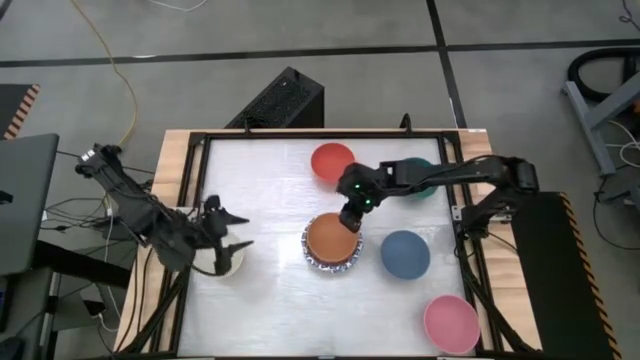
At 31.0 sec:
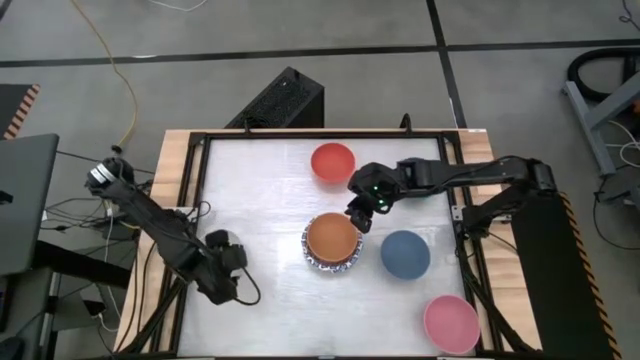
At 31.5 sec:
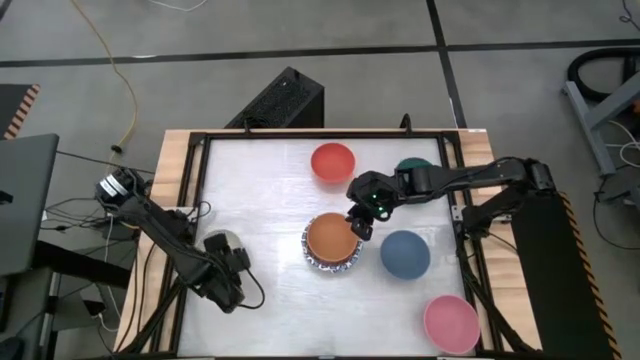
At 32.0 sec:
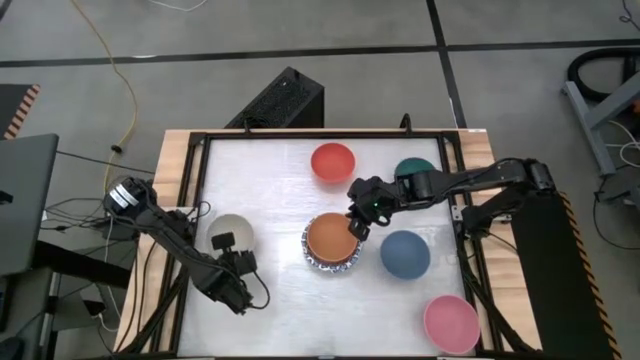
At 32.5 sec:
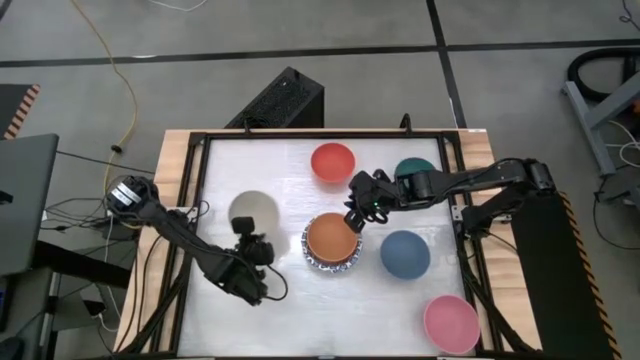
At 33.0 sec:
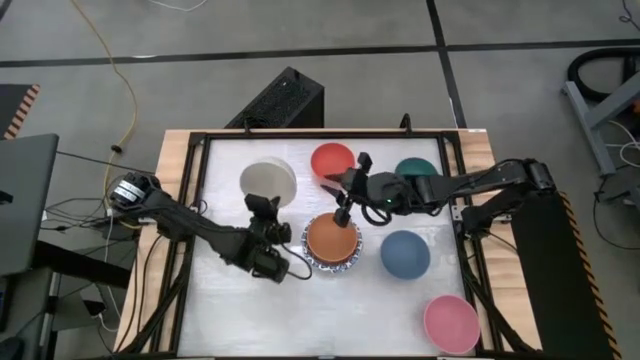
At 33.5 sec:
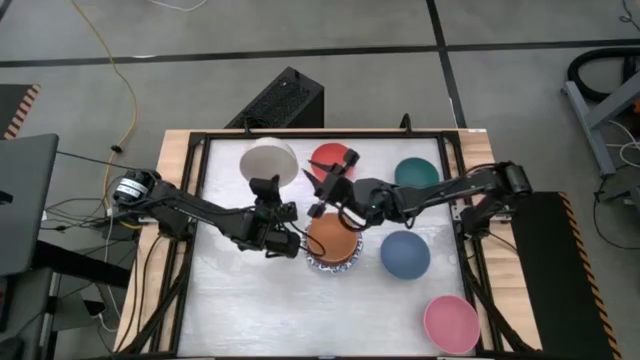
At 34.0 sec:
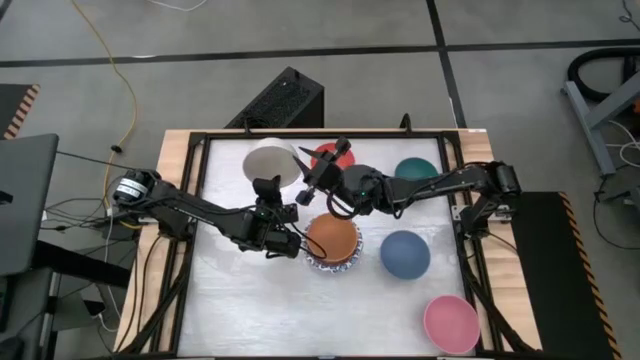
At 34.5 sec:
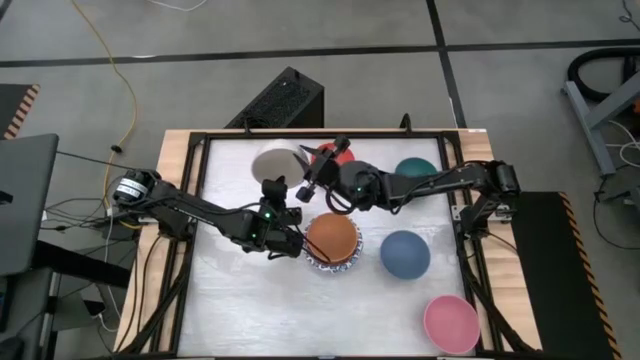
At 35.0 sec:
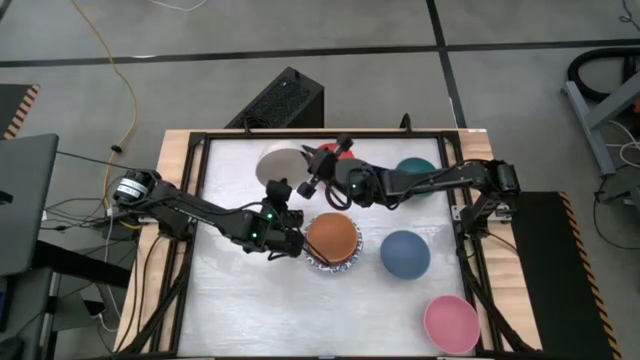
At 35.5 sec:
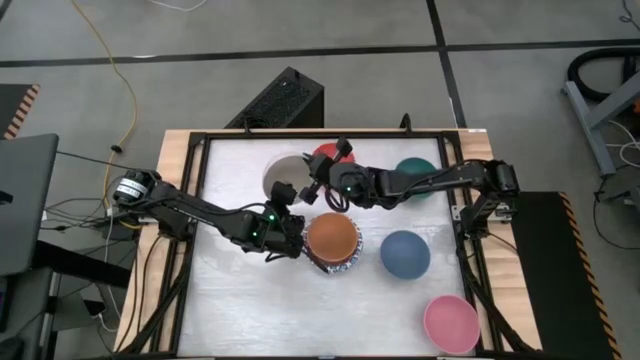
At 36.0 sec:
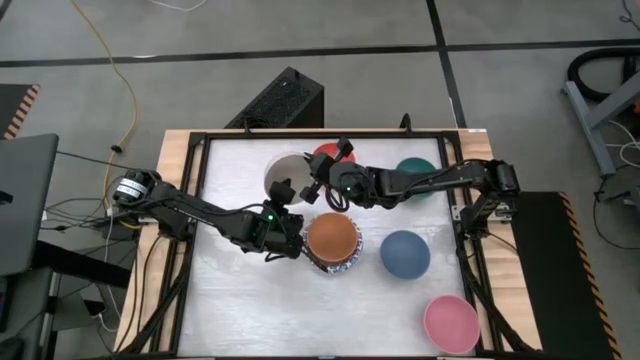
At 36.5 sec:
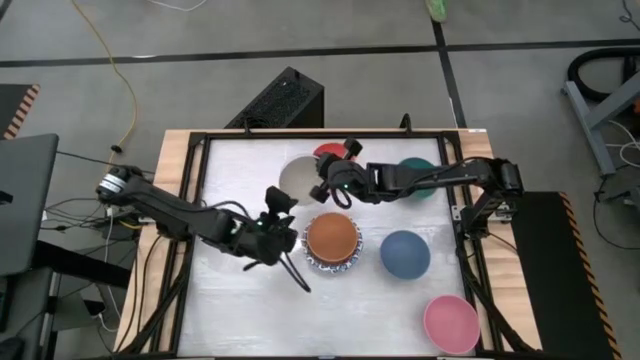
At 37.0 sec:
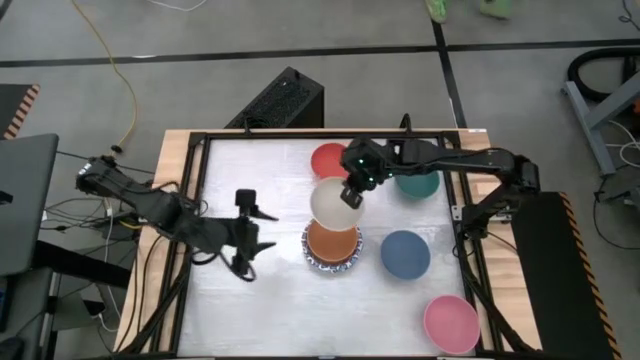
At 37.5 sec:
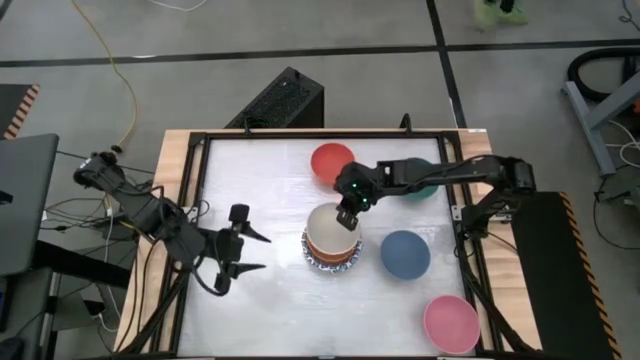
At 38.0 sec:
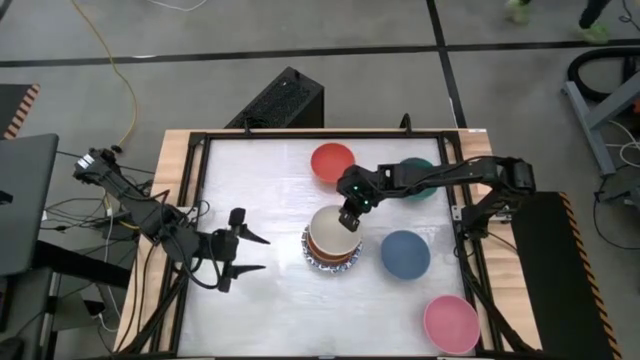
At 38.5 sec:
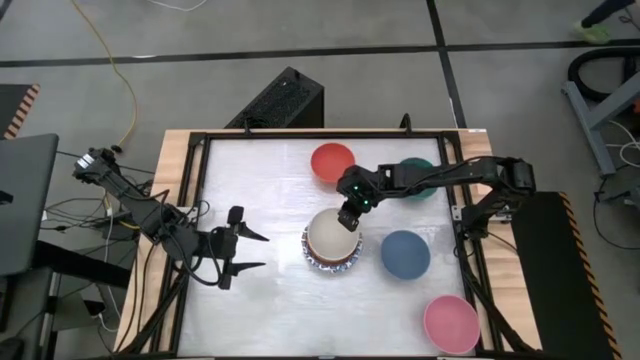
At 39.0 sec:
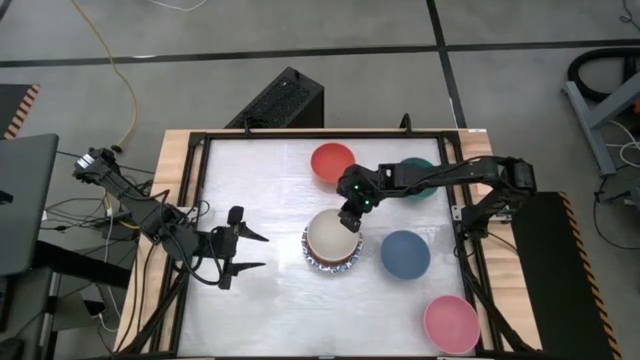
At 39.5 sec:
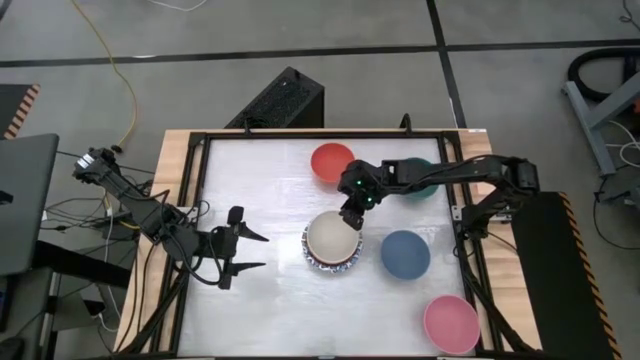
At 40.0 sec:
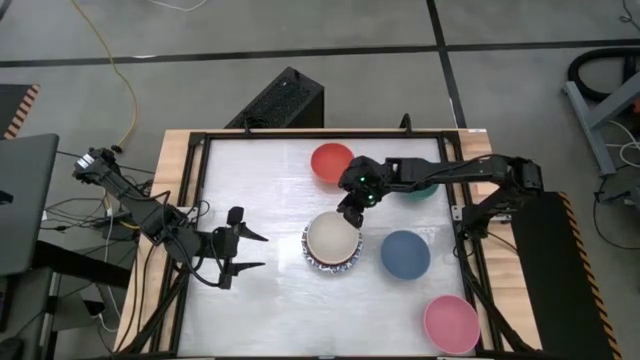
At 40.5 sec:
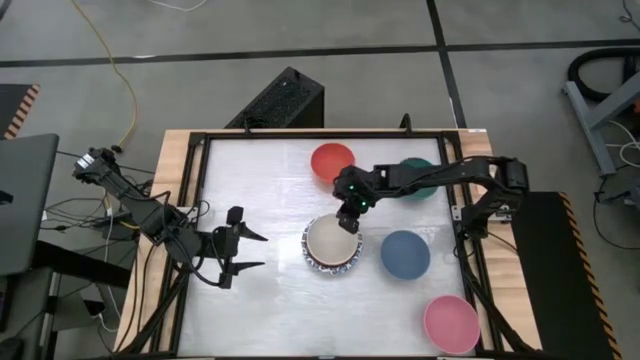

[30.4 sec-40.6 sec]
Stack the gray bowl into the brown bowl

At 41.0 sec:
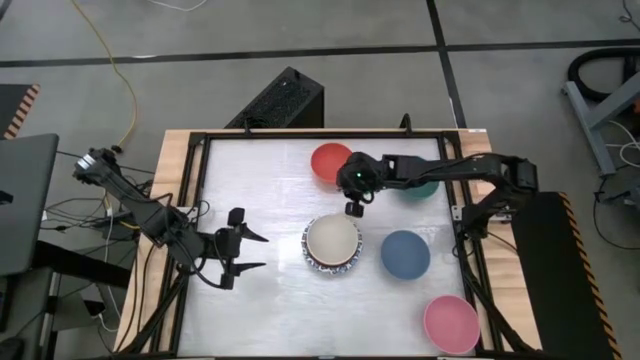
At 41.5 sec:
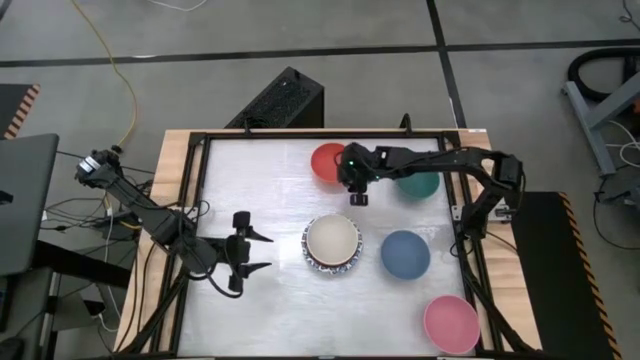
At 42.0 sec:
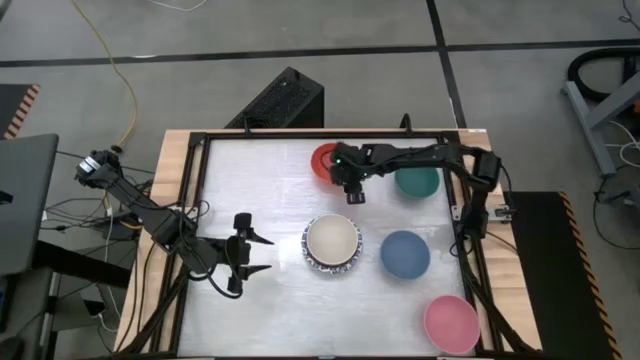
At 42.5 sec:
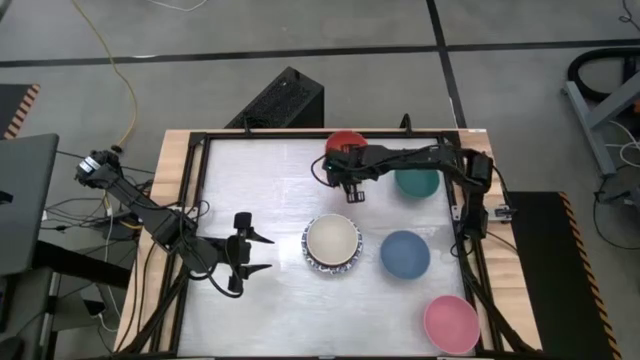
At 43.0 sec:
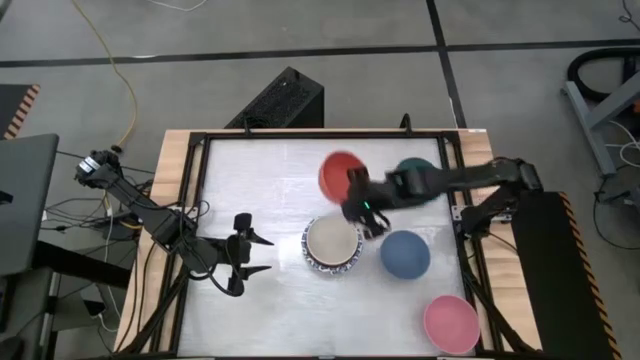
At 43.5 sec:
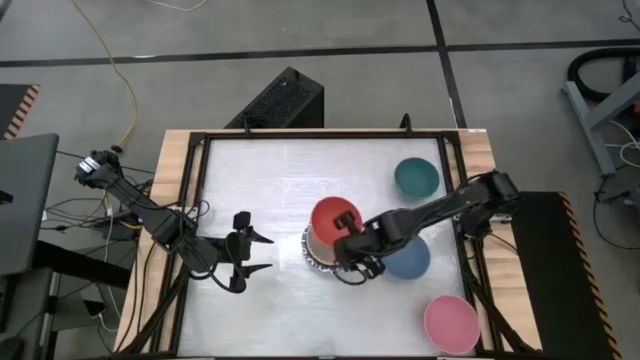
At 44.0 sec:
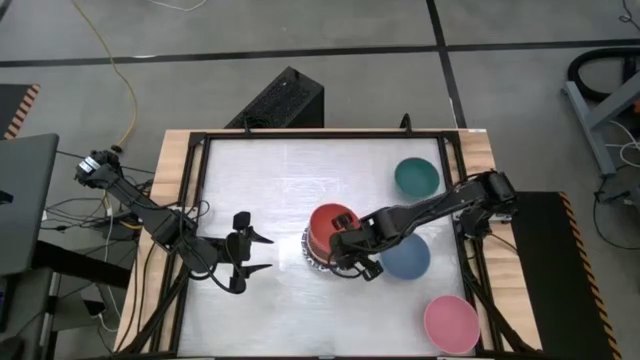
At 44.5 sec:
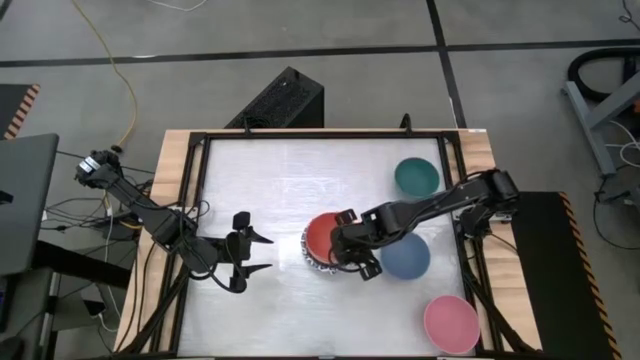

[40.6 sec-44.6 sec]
Stack the orange bowl into the gray bowl

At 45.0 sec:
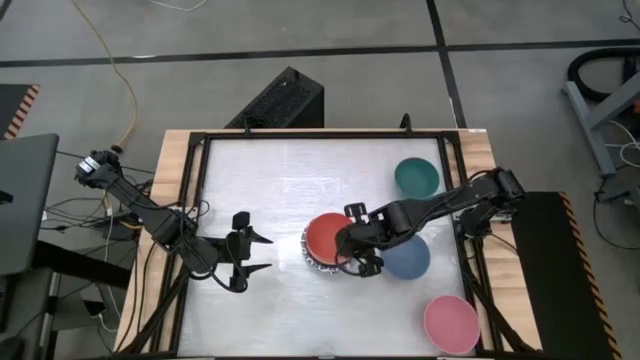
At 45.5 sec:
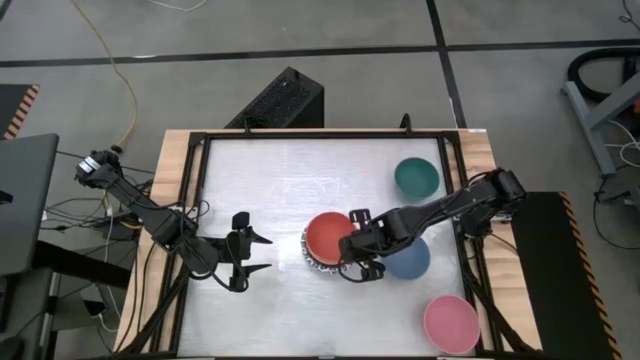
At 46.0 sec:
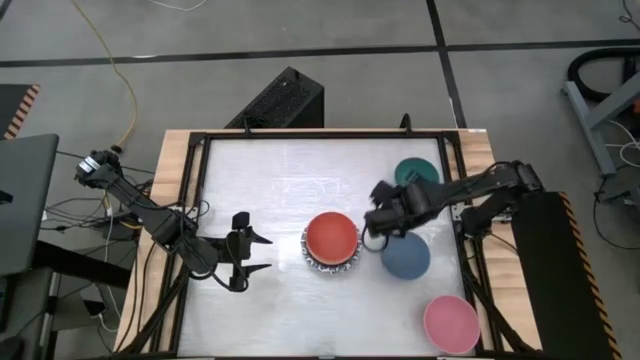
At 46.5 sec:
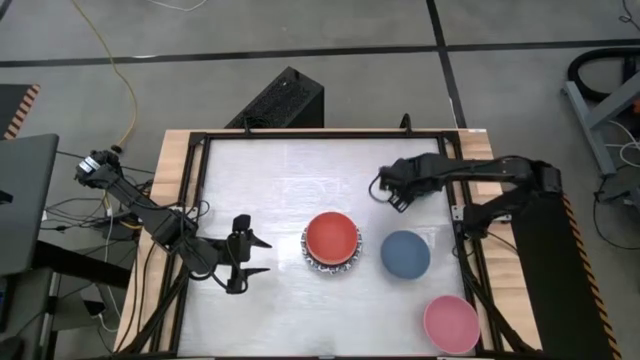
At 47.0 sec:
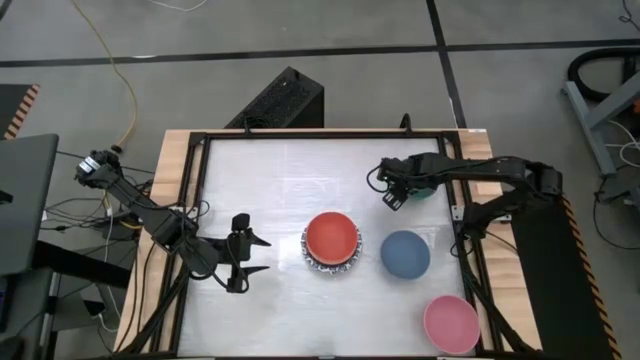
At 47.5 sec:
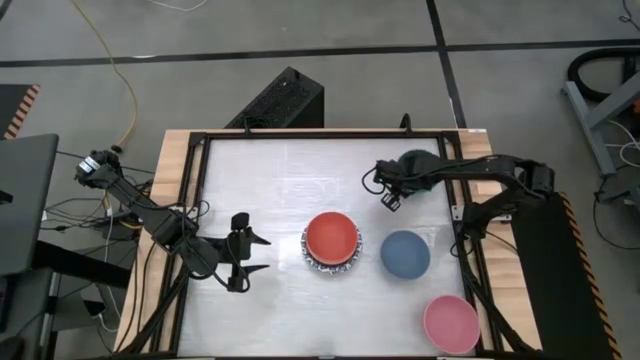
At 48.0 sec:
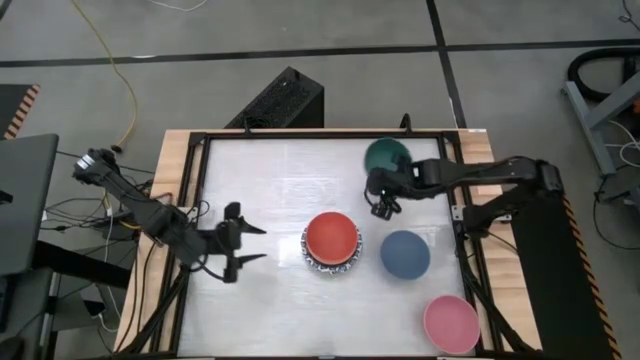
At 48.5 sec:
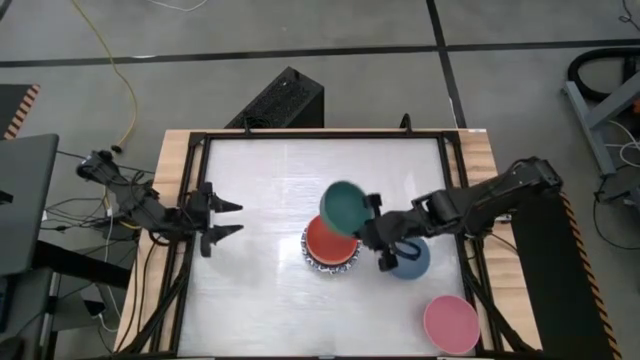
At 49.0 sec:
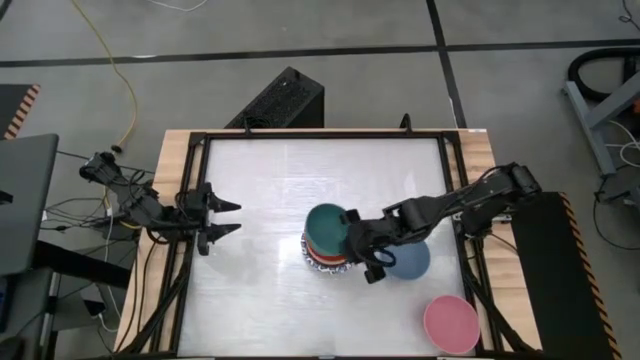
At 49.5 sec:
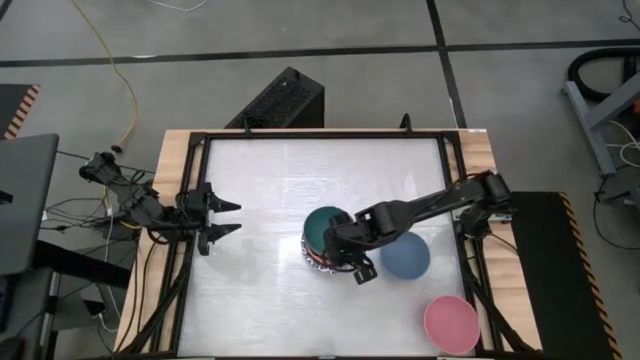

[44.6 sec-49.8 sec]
Stack the green bowl onto the orange bowl

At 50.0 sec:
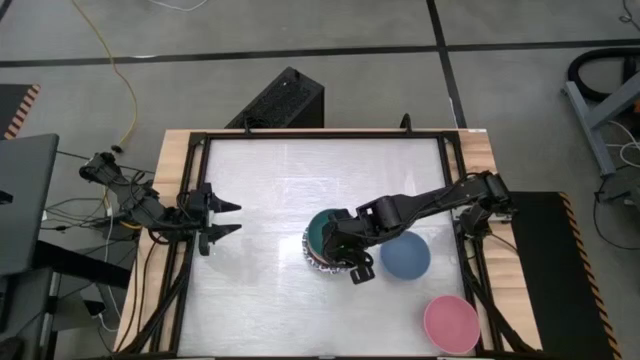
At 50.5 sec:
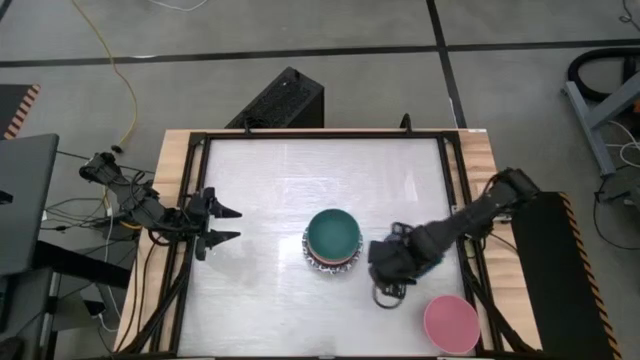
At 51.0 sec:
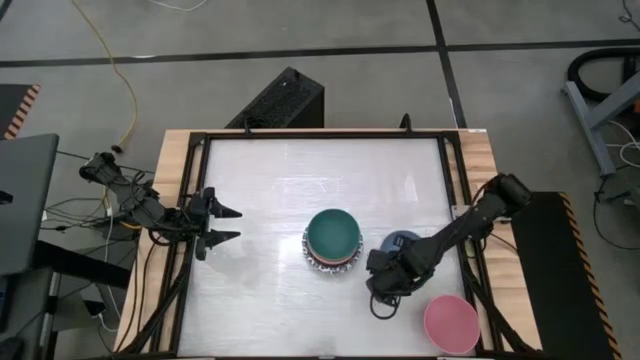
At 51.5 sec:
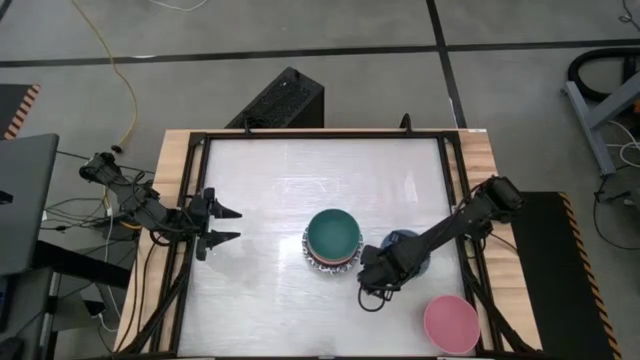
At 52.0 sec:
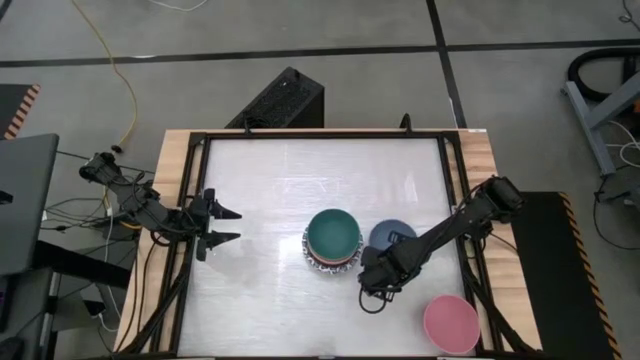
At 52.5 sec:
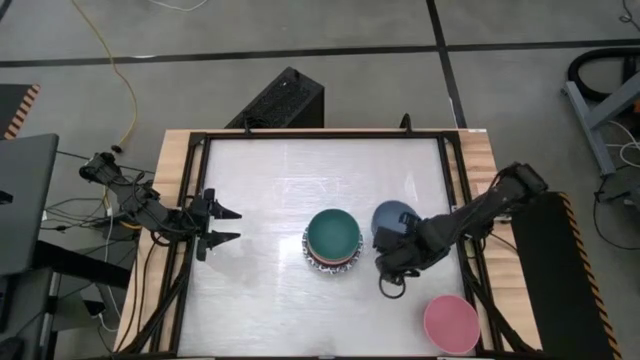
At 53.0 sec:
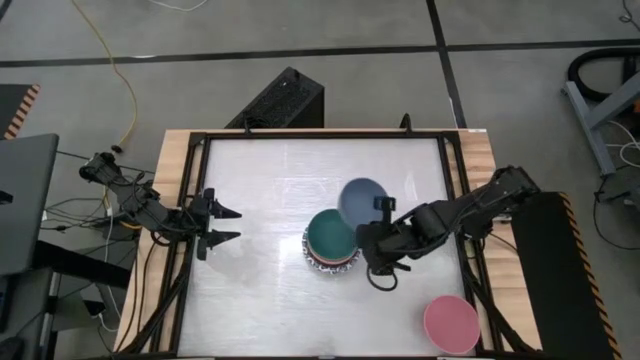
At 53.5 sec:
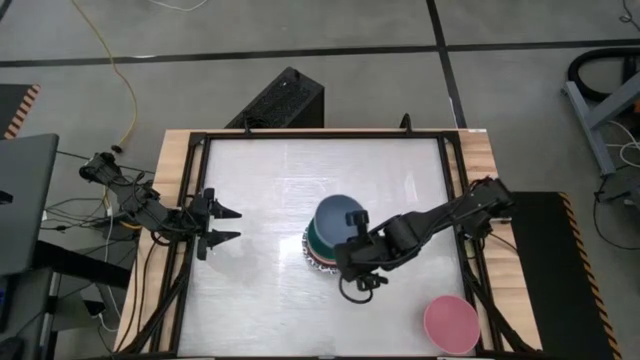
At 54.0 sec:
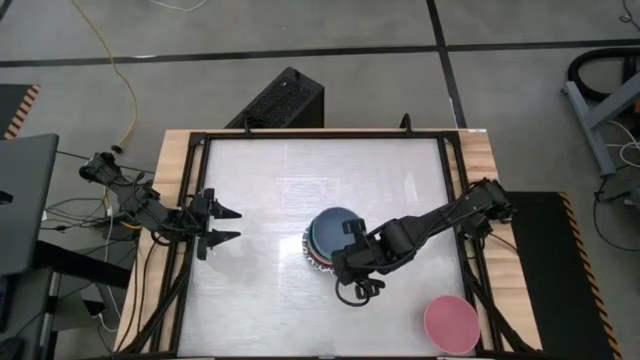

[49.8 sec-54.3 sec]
Stack the blue bowl into the green bowl
